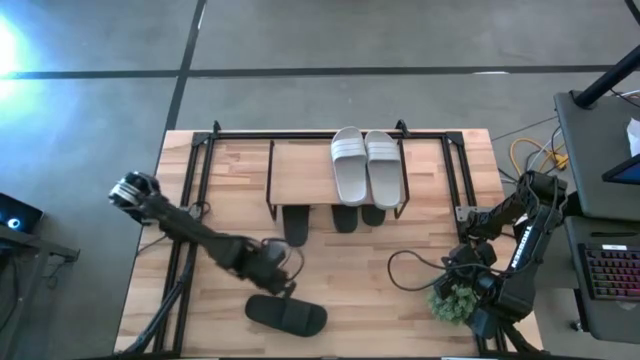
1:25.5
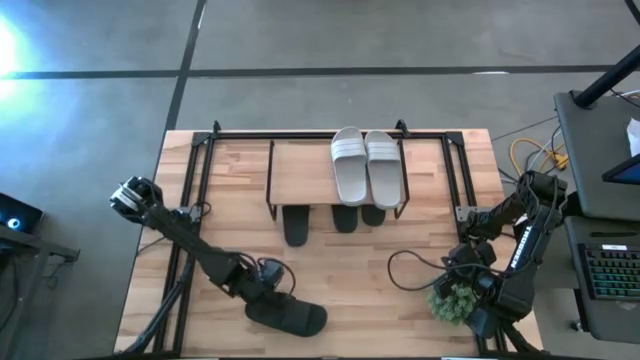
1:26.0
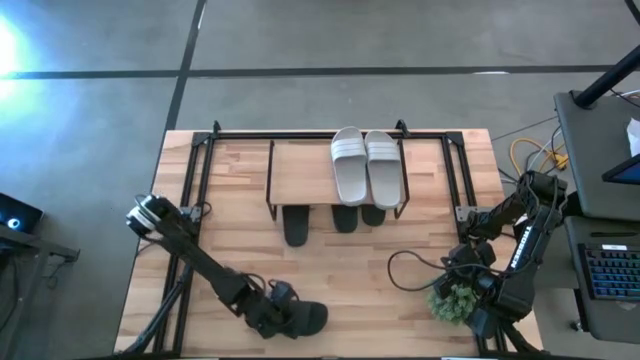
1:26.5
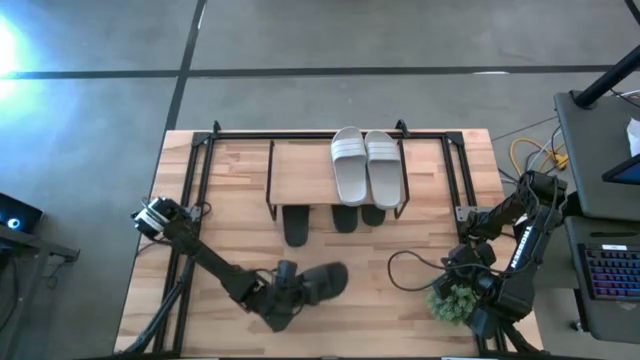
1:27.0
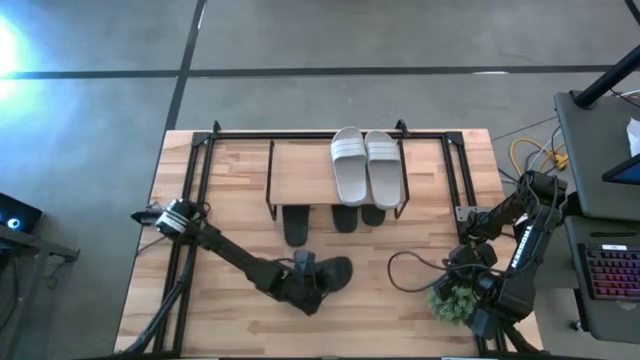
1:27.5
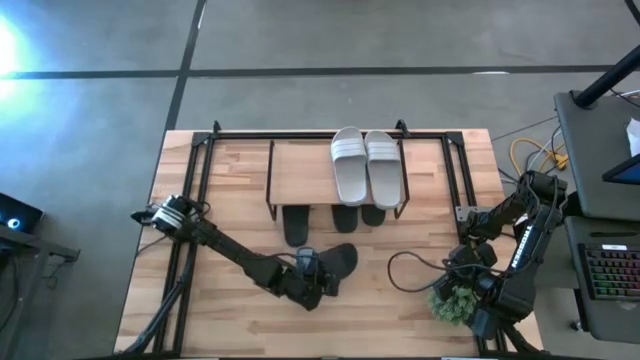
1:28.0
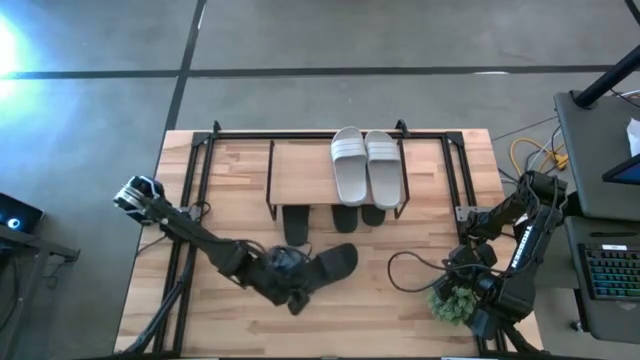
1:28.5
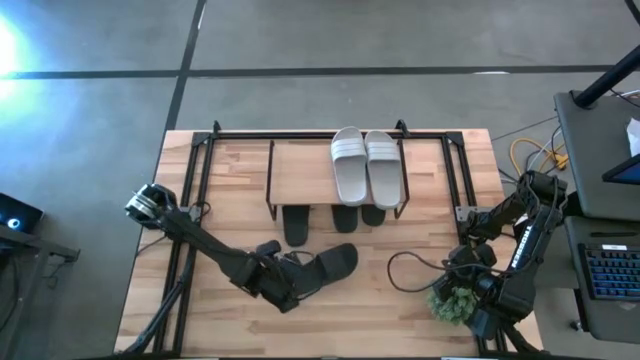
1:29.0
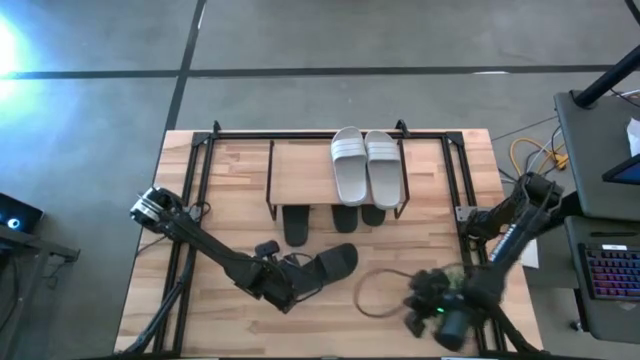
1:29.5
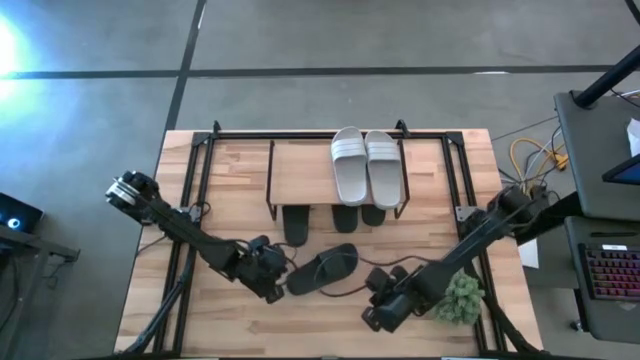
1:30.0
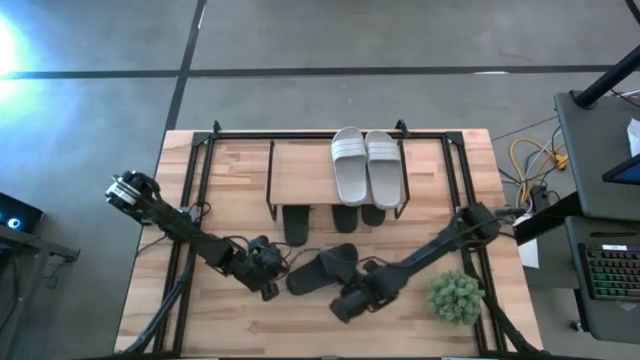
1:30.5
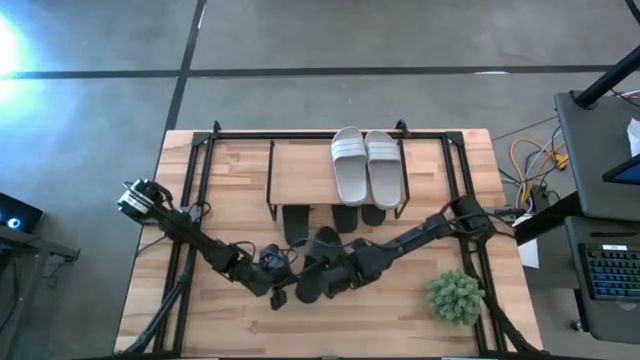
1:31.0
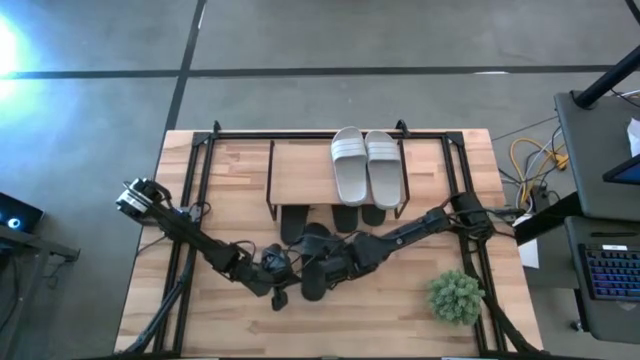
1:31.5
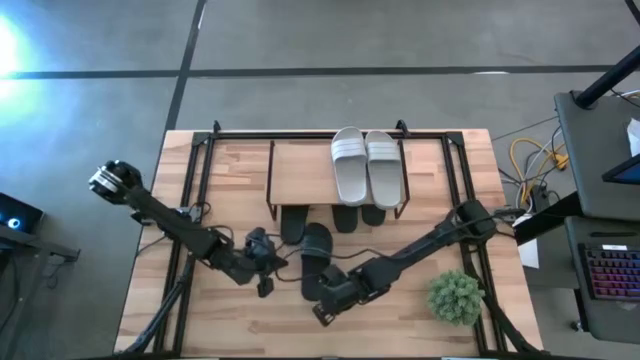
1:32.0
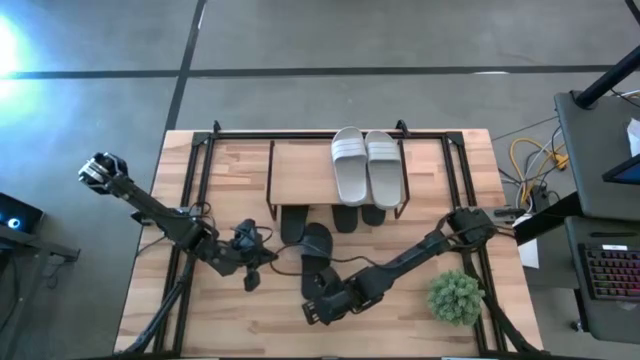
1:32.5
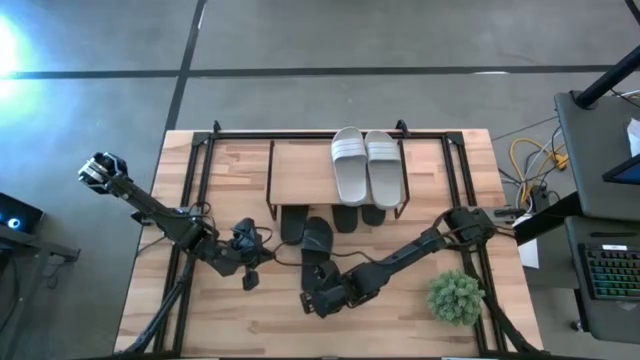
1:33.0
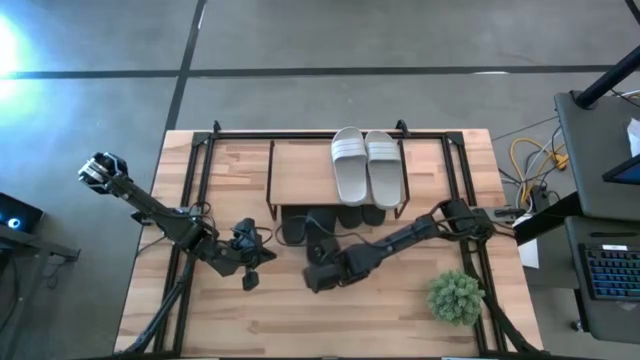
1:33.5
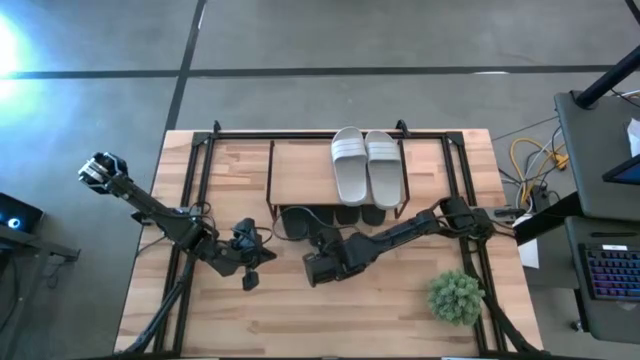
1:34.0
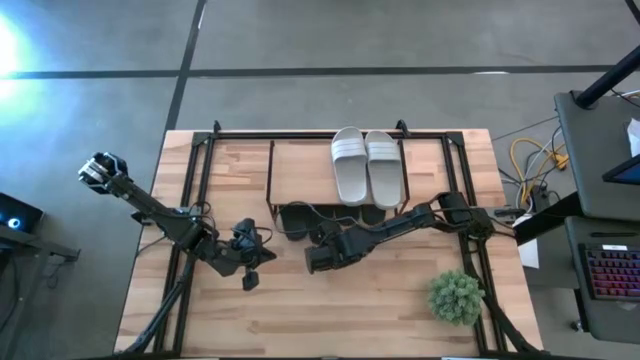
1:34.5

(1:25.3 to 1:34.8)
Task: Pick and place slides into the shelf
Put the black slipper under the shelf

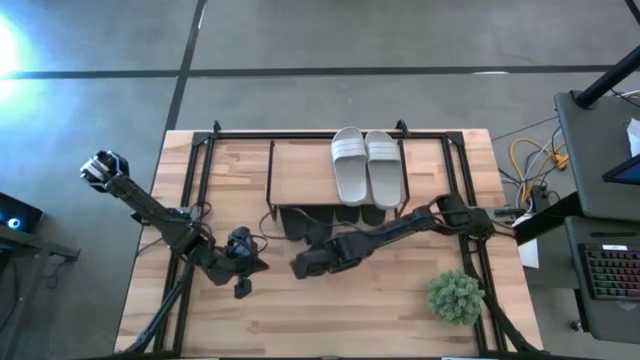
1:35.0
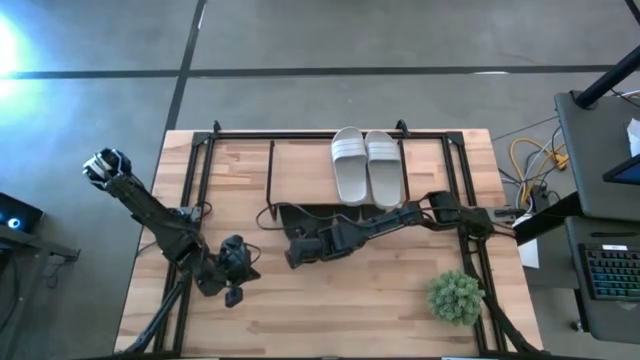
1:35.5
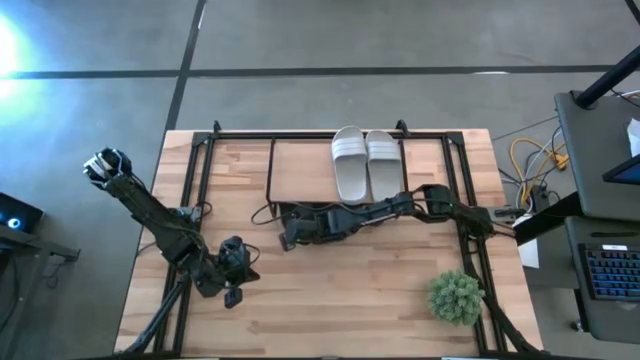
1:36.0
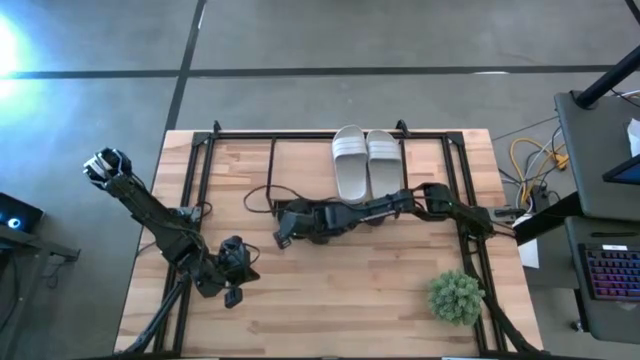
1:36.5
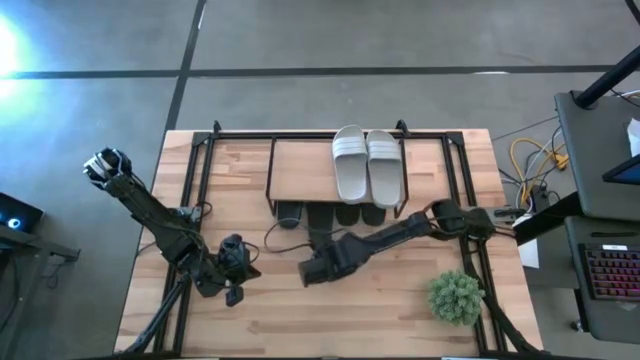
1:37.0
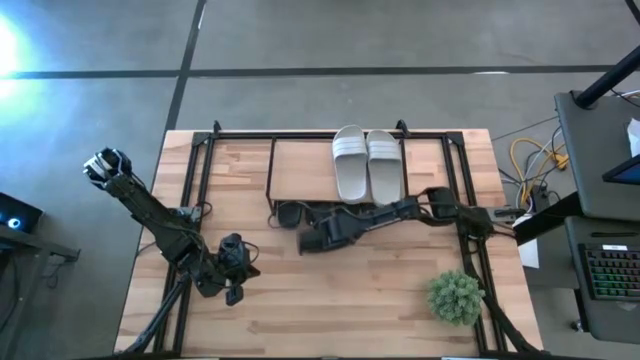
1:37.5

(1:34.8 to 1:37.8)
Adjust the black slippers under the shelf

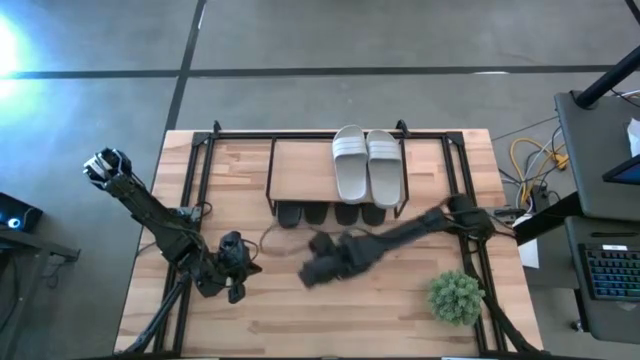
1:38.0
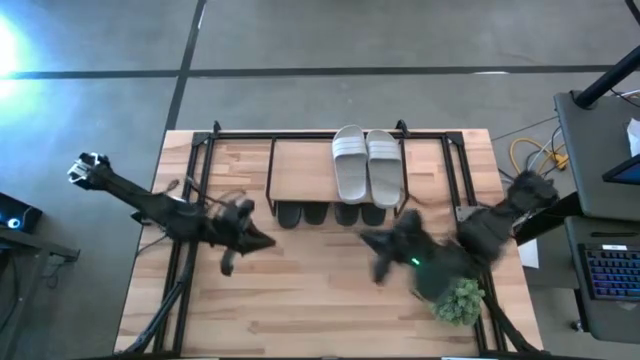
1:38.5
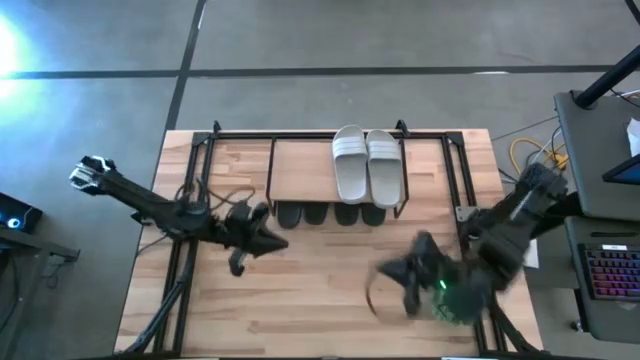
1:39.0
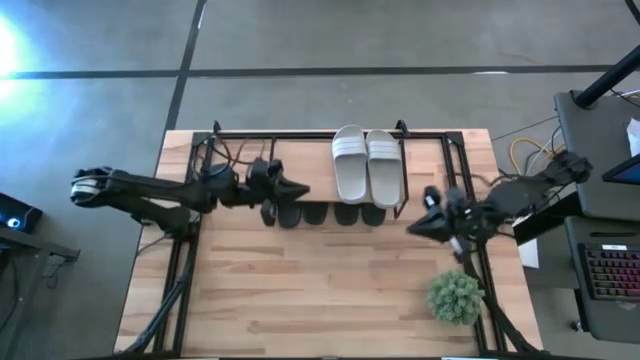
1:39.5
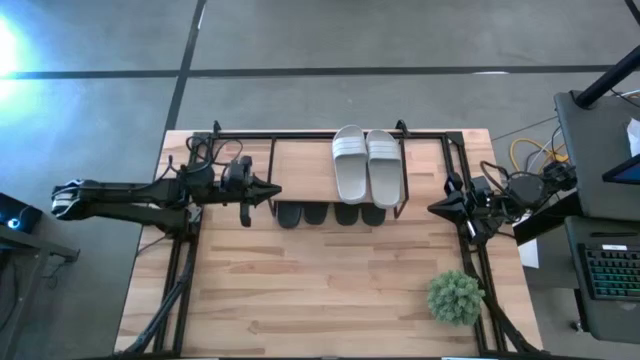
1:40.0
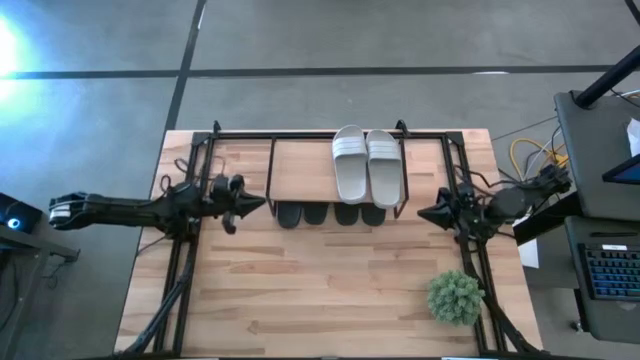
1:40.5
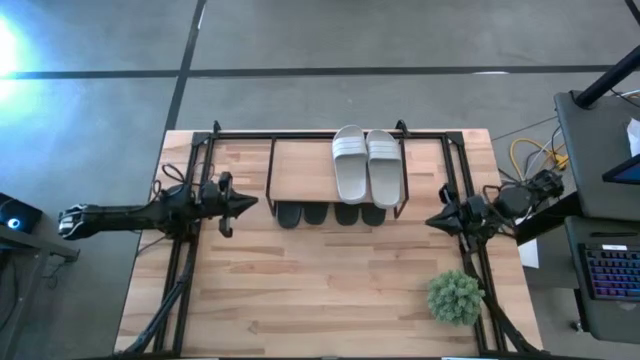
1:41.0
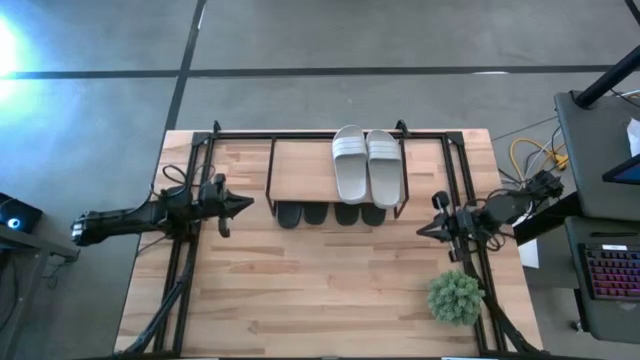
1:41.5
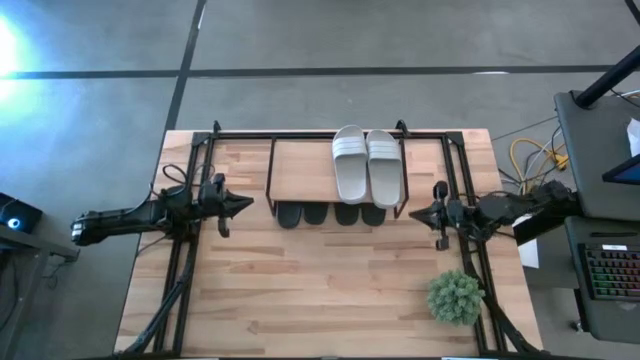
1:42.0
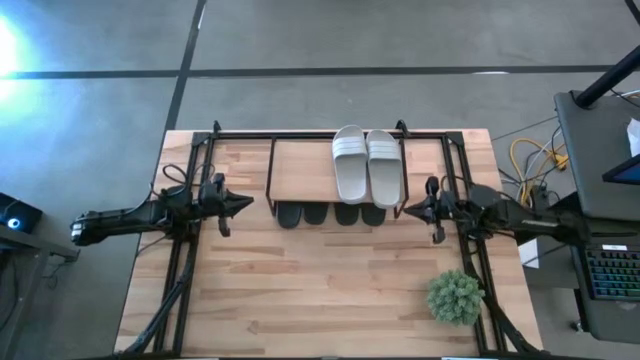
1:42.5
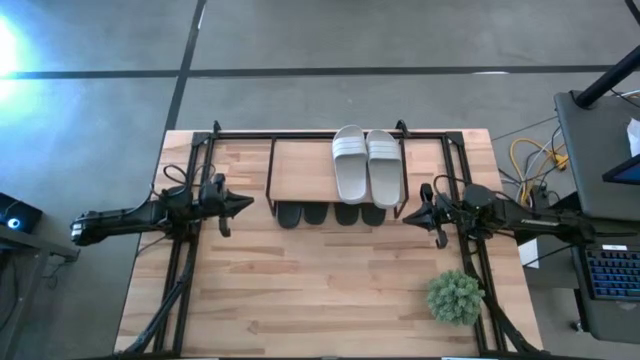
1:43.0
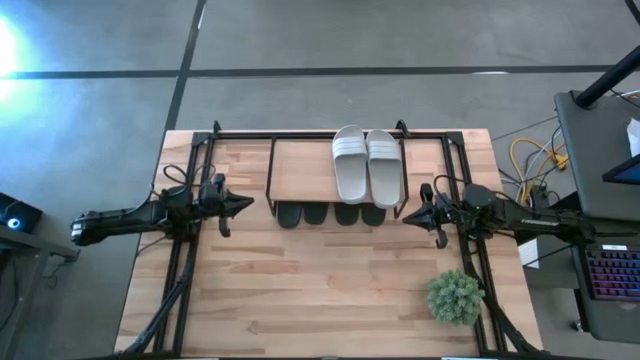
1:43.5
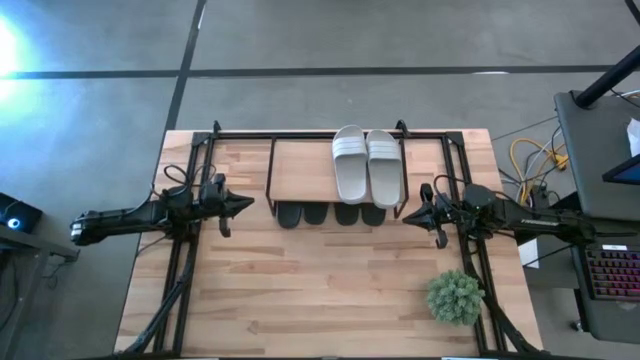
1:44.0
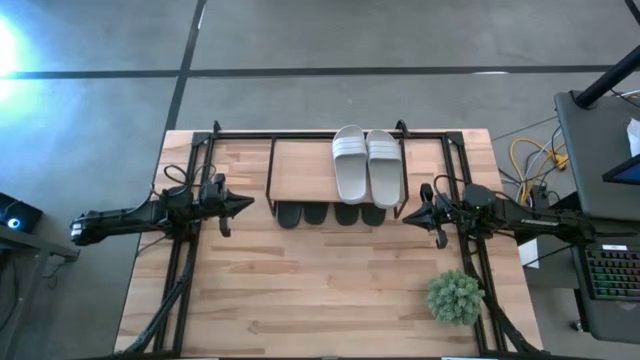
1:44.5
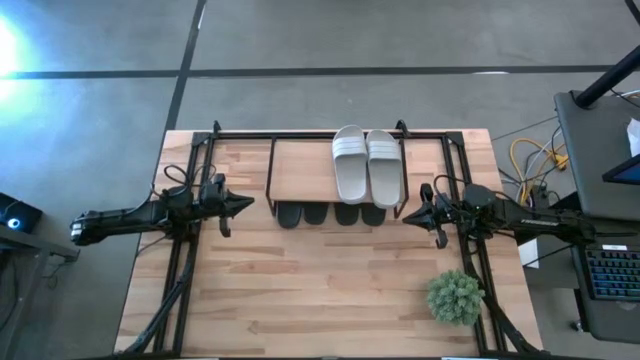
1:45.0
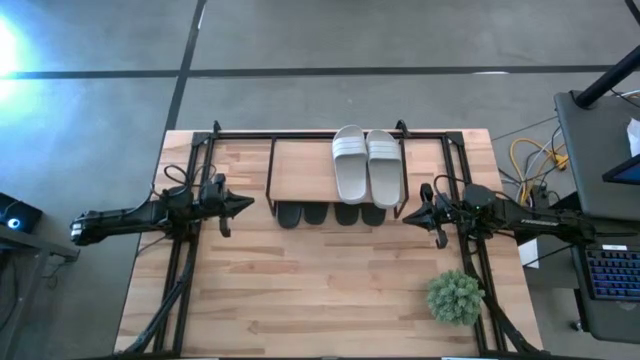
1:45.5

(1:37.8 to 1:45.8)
Return to Home Position
